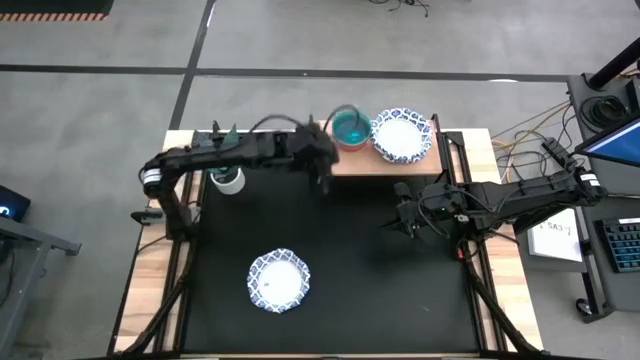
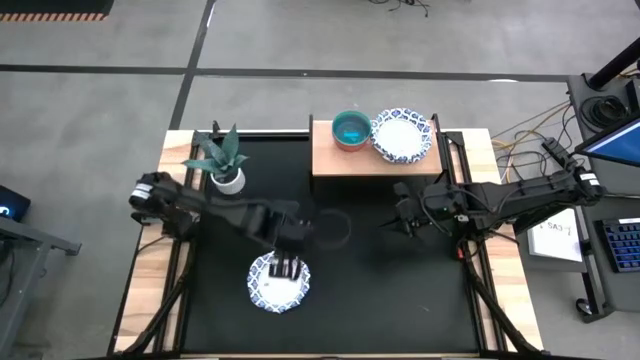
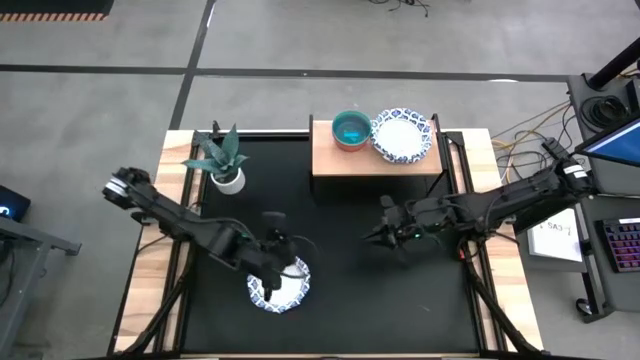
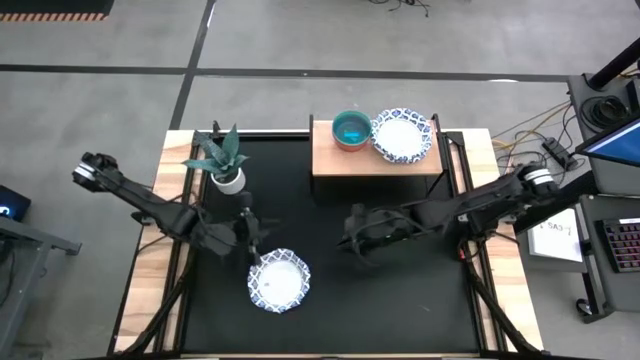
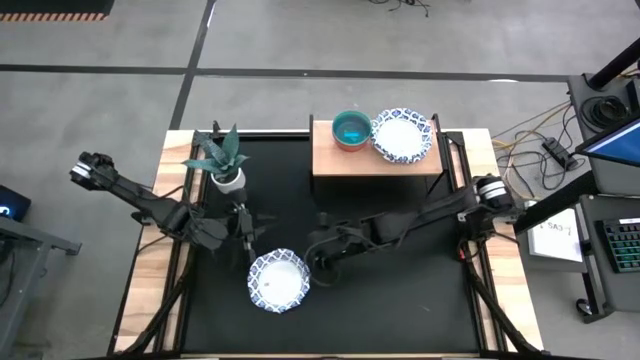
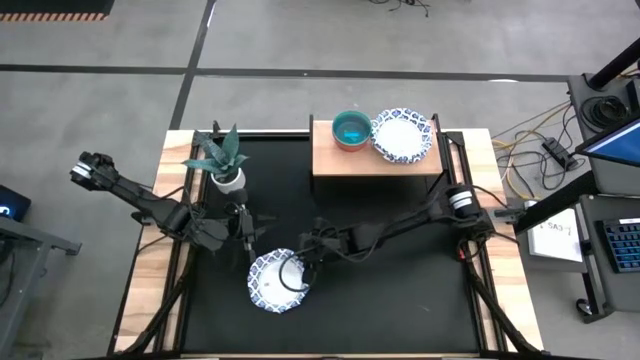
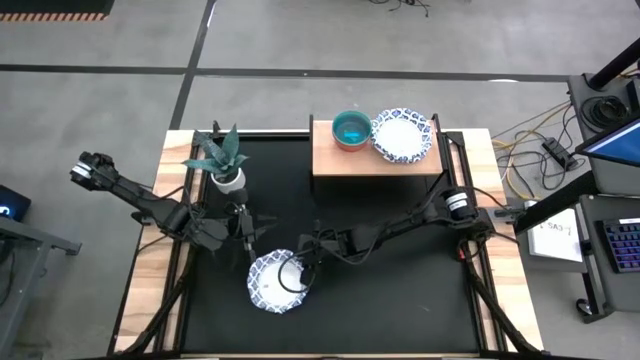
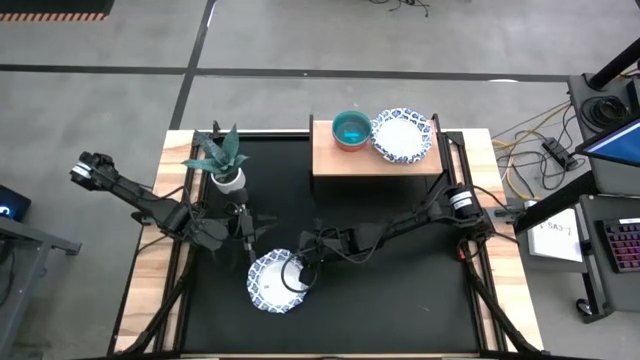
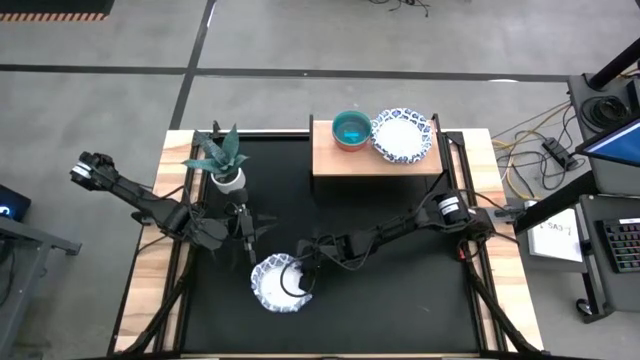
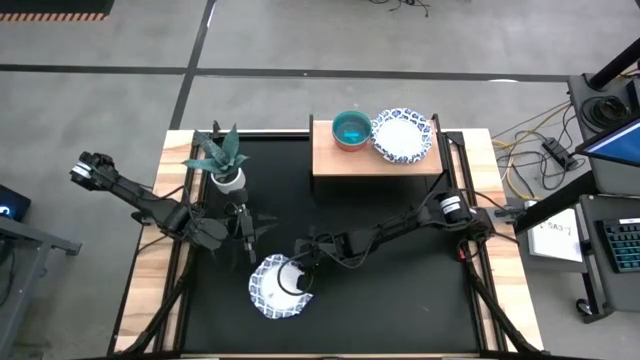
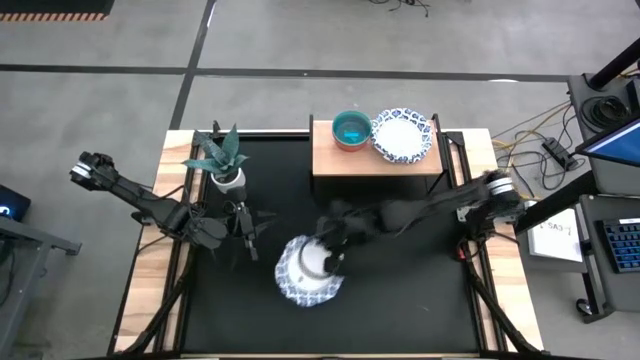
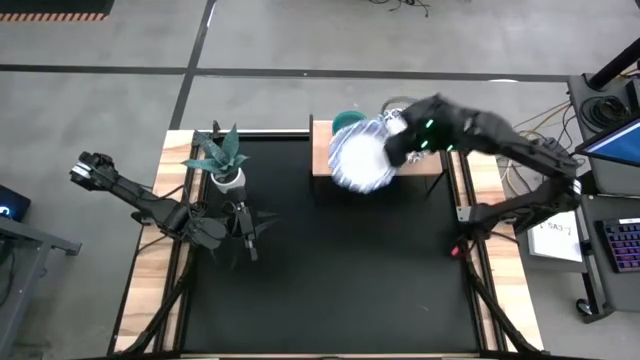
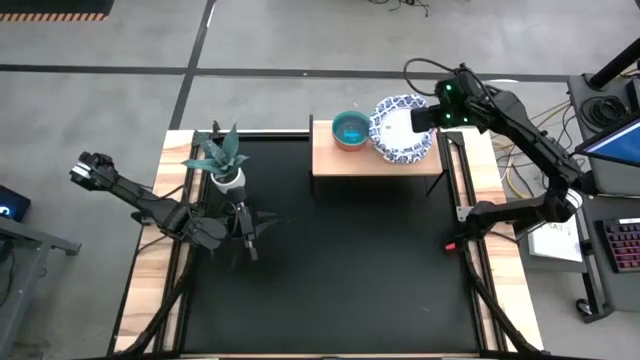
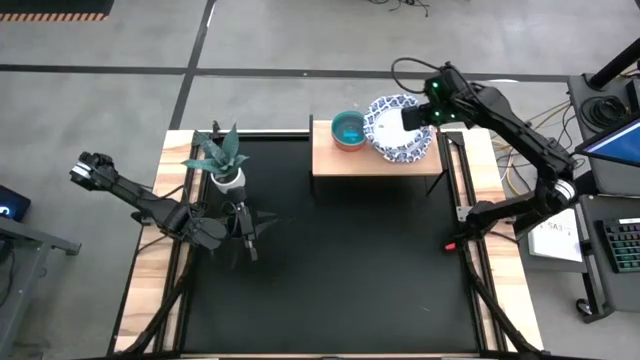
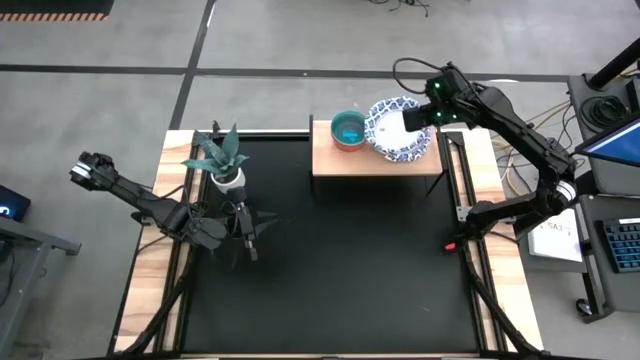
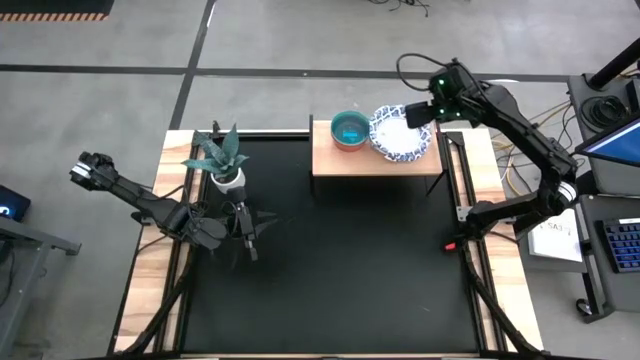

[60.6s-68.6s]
Task: Place and stack bowls onto a shelf
Stack the white paper plate on top of the white paper plate on the shelf

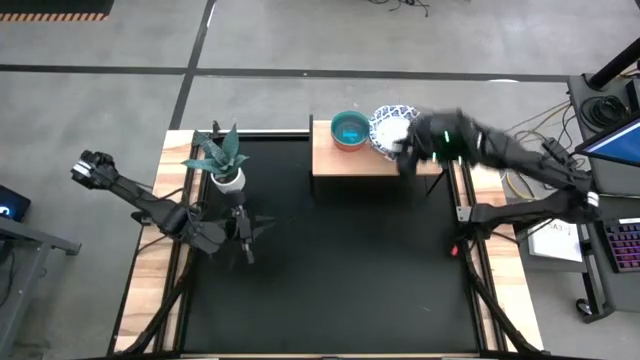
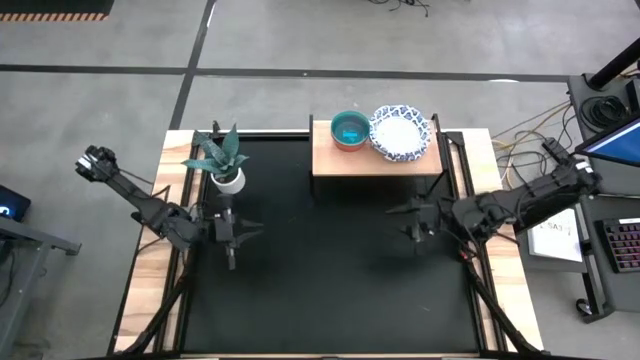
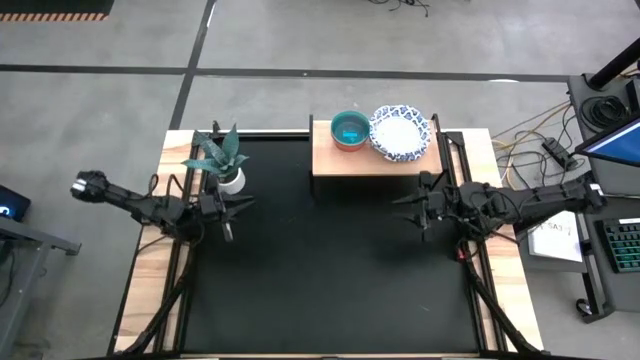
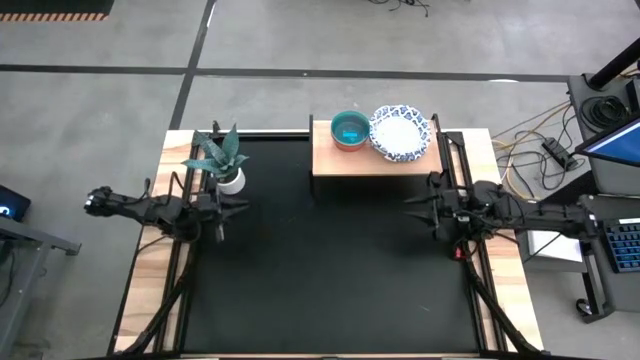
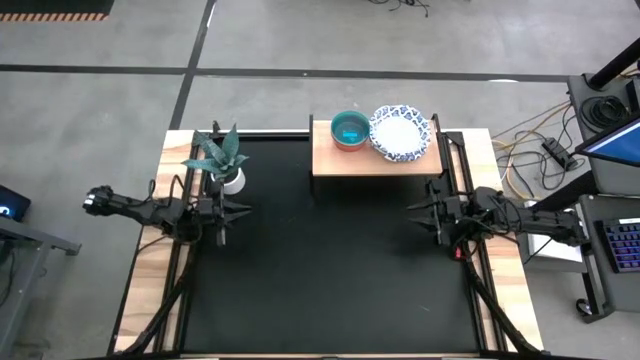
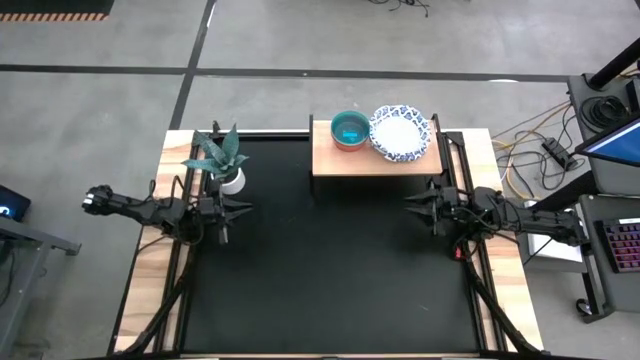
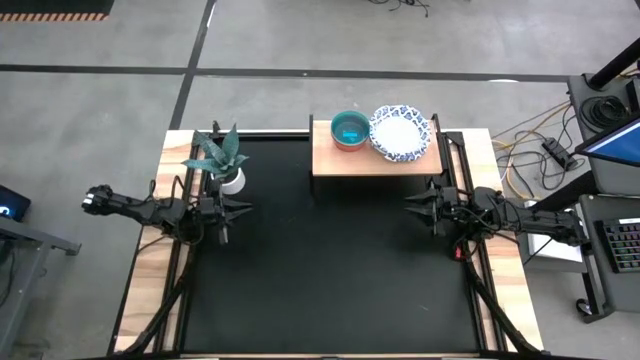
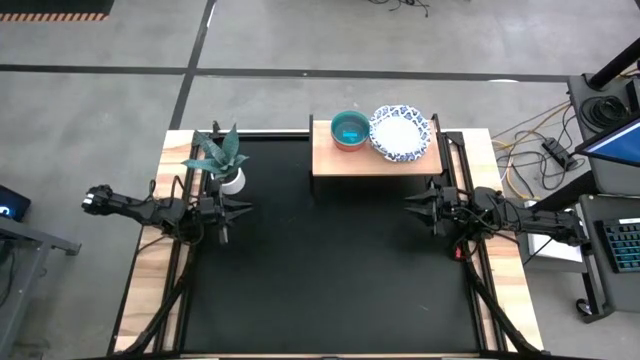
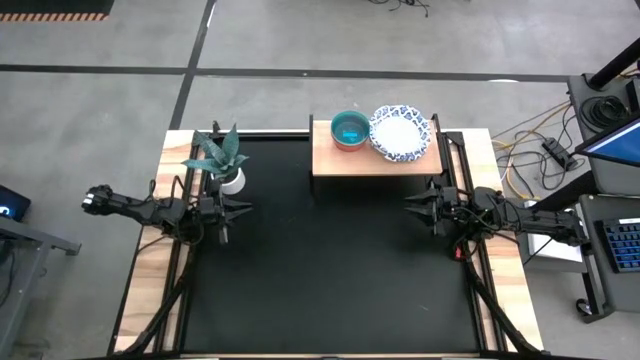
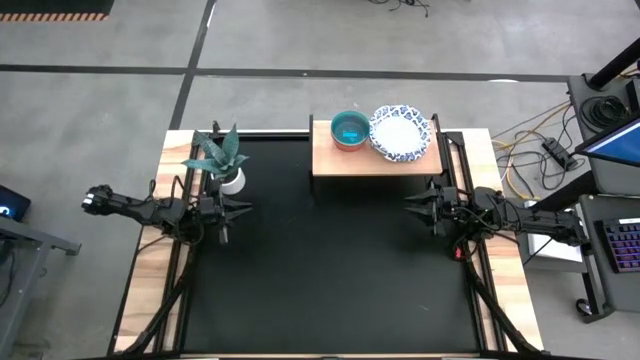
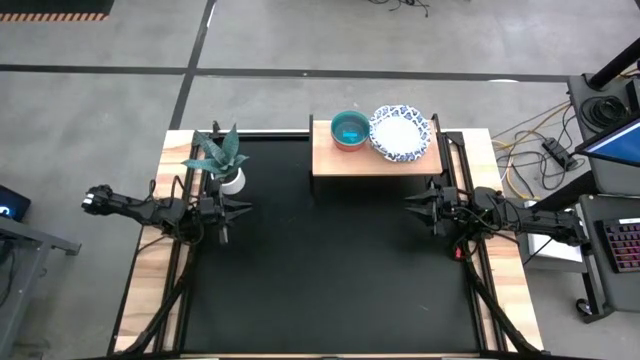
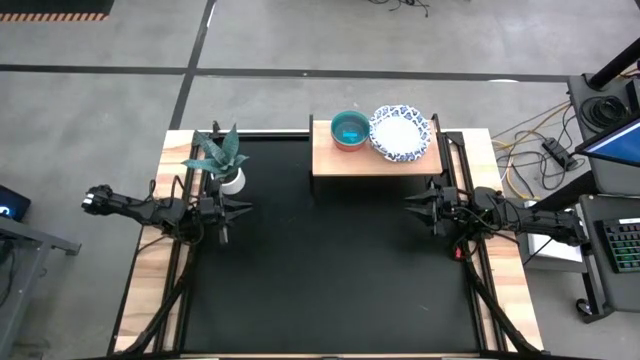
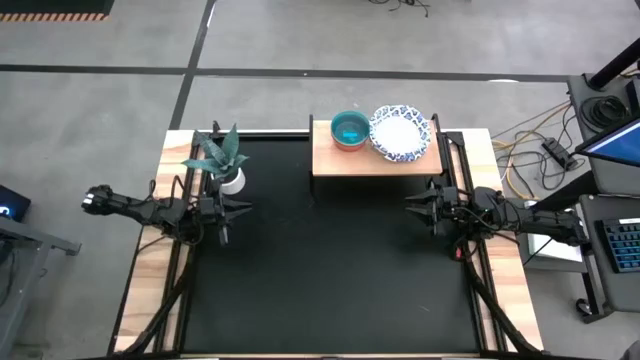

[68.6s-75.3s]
Return to Home Position

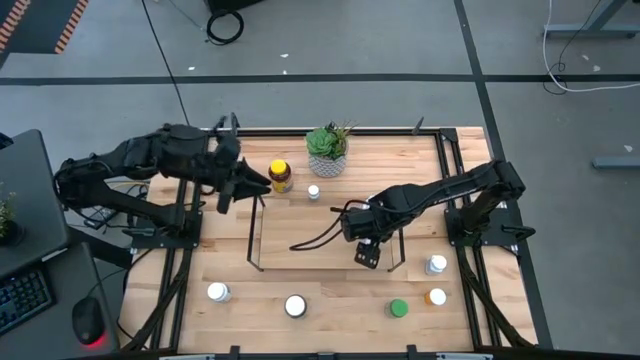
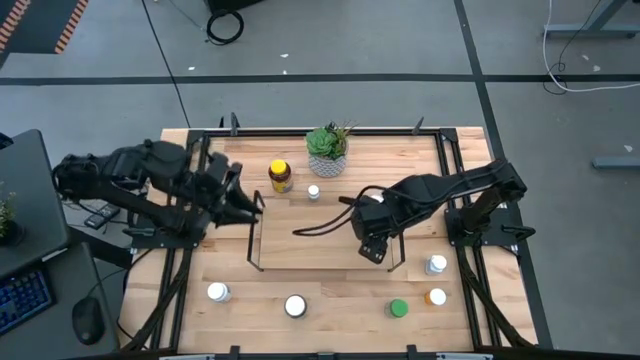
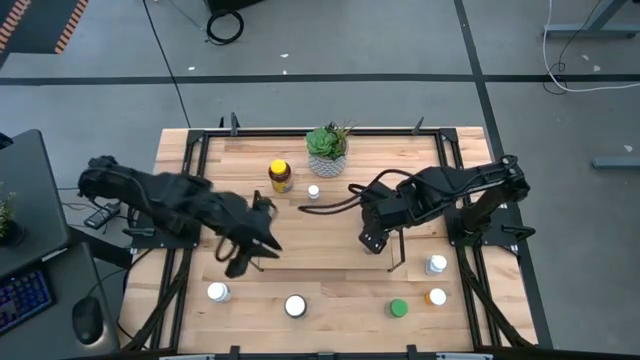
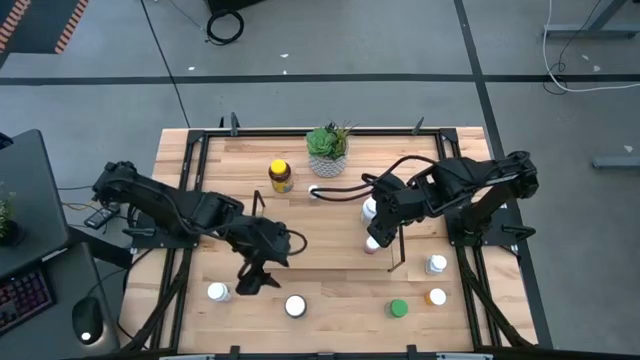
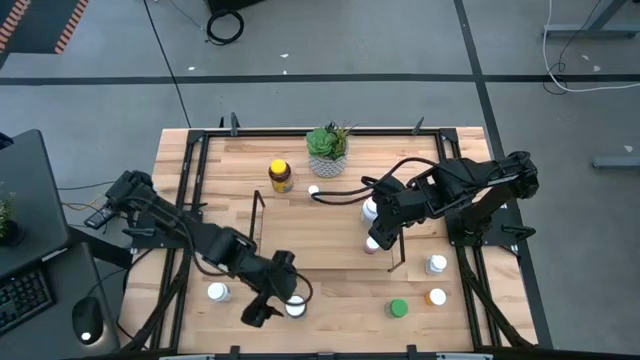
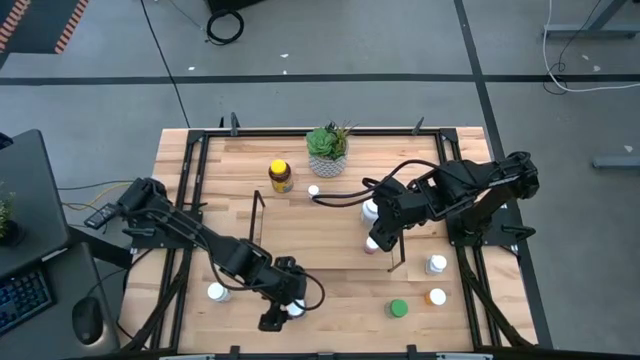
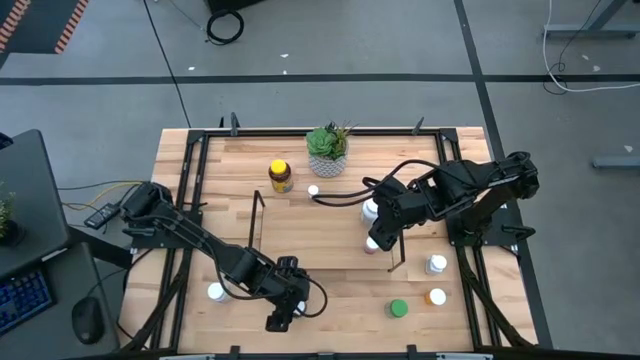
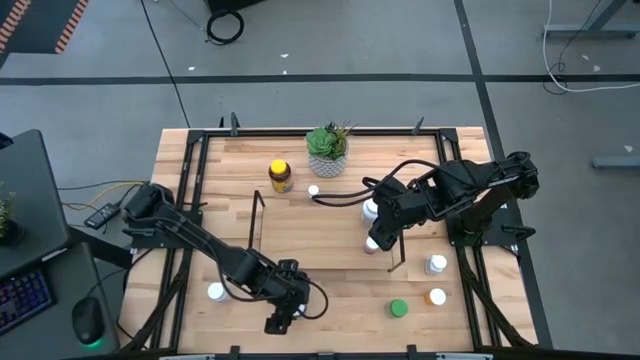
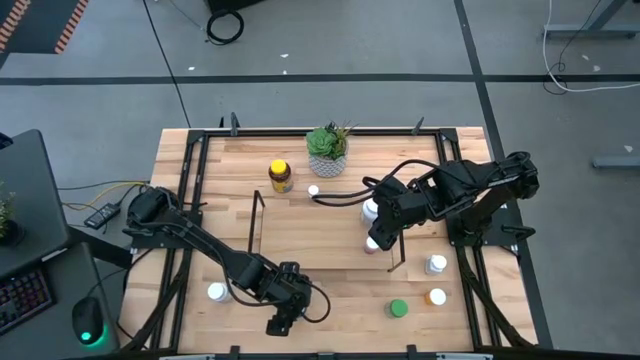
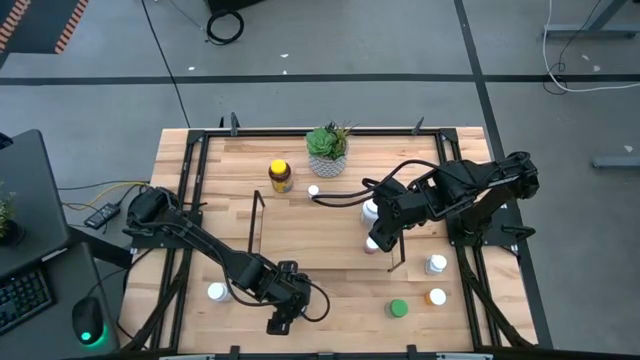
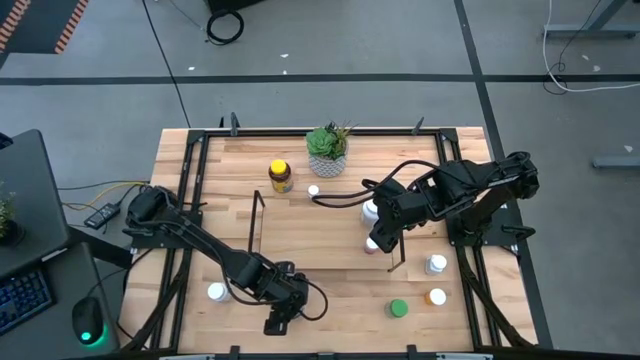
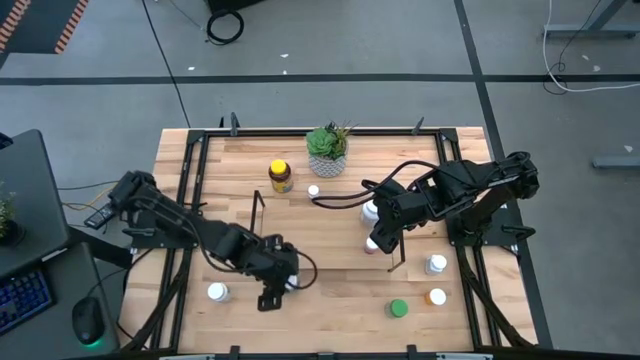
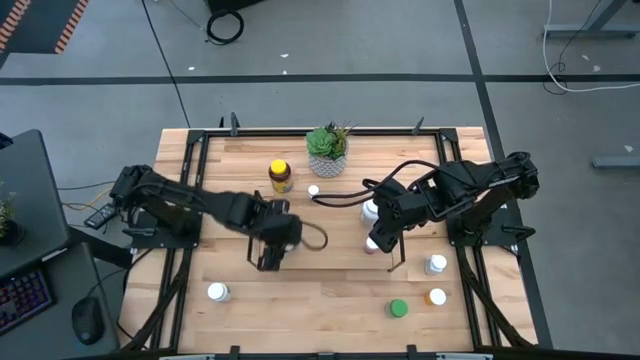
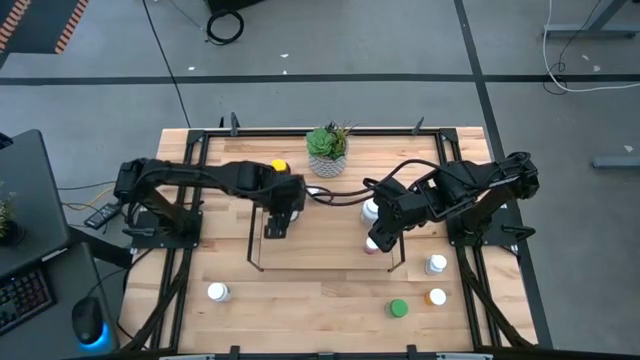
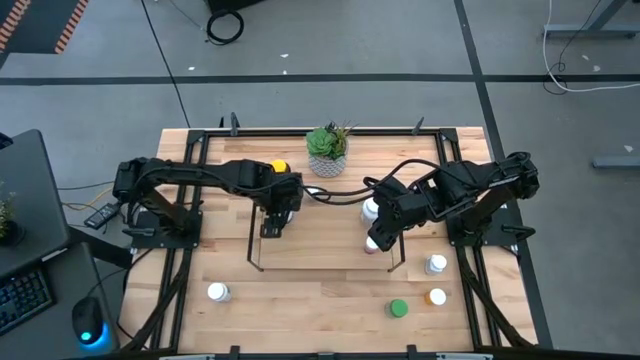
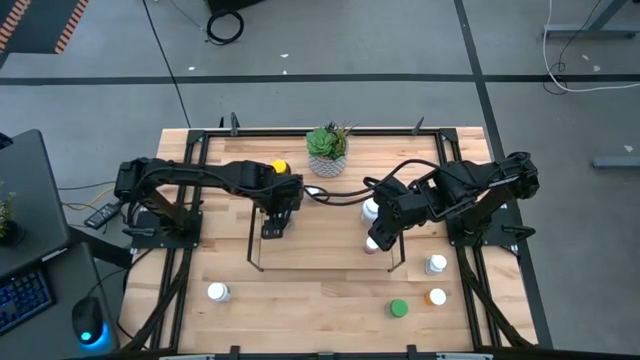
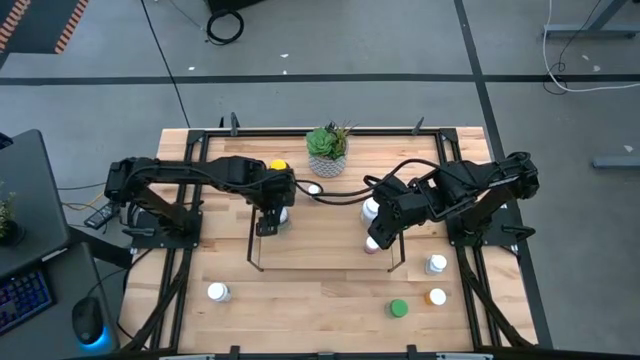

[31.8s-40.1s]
Task: Pick and place medicine bottles onto shelf by color
Put the large green medicine bottle on the shelf
